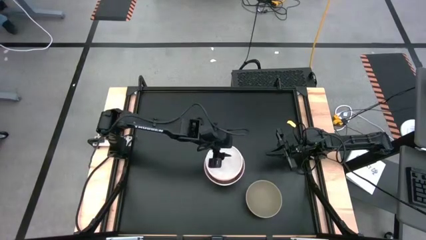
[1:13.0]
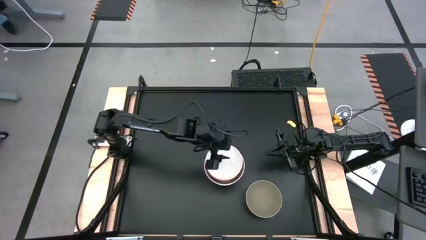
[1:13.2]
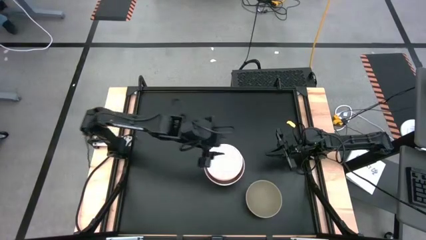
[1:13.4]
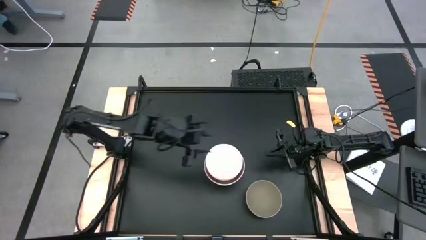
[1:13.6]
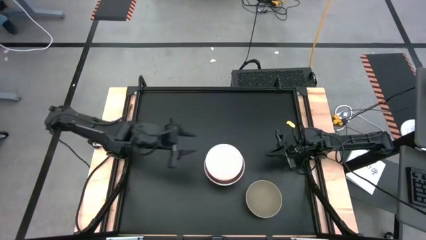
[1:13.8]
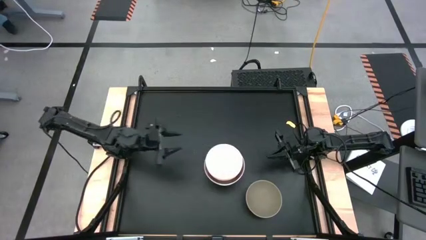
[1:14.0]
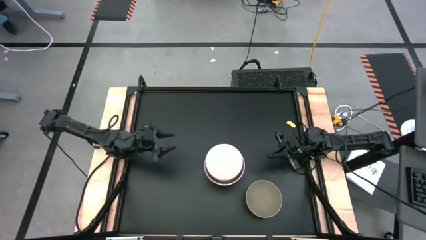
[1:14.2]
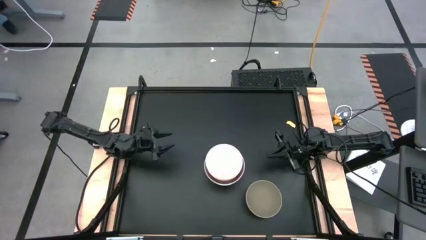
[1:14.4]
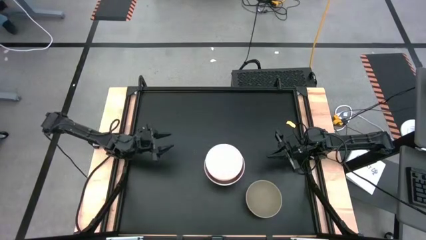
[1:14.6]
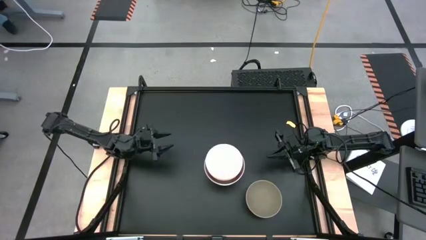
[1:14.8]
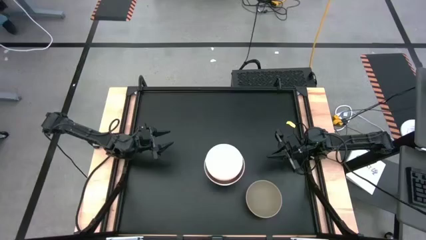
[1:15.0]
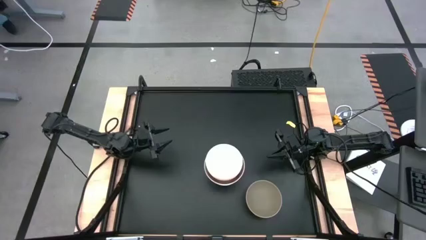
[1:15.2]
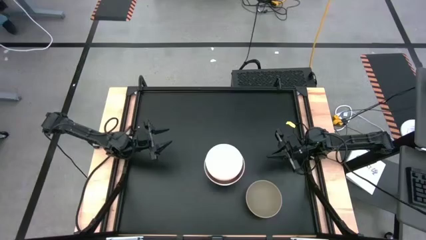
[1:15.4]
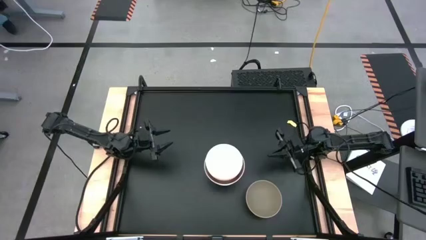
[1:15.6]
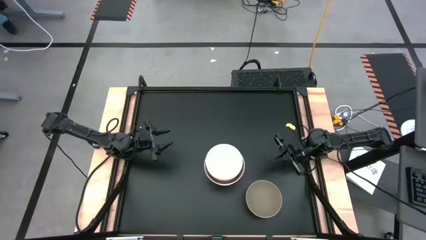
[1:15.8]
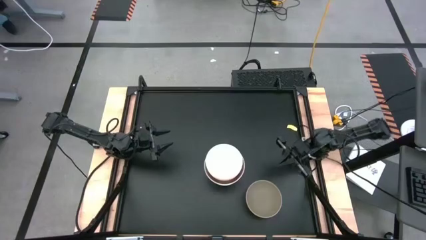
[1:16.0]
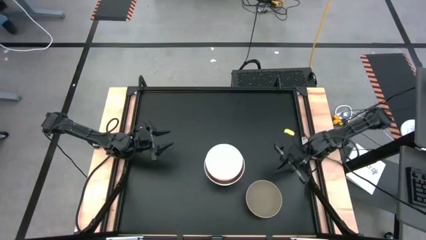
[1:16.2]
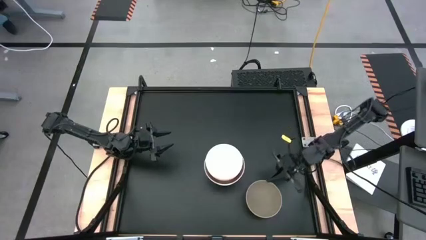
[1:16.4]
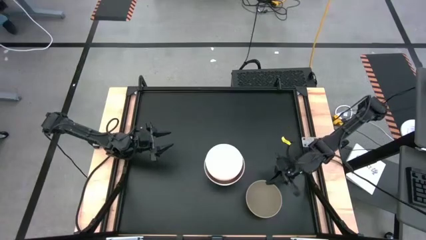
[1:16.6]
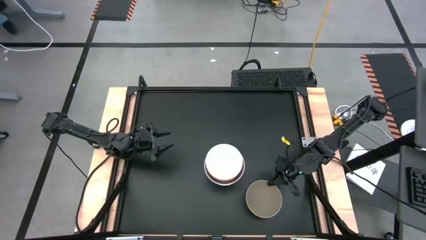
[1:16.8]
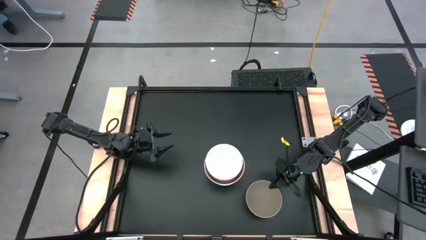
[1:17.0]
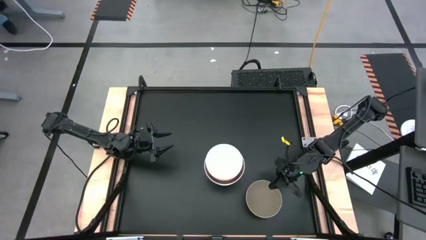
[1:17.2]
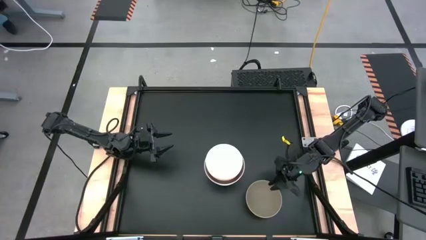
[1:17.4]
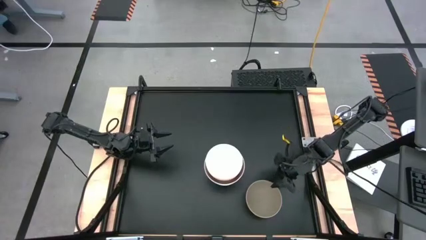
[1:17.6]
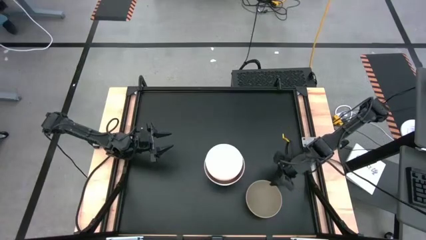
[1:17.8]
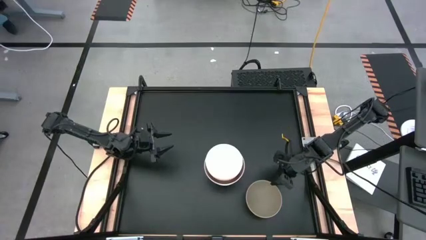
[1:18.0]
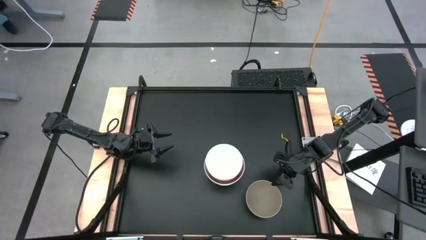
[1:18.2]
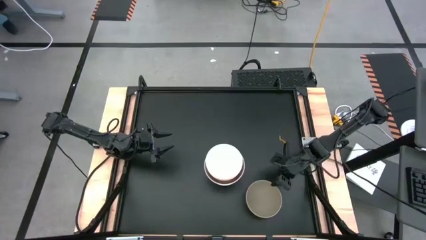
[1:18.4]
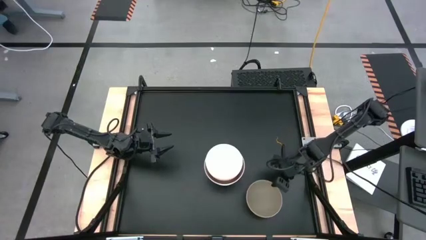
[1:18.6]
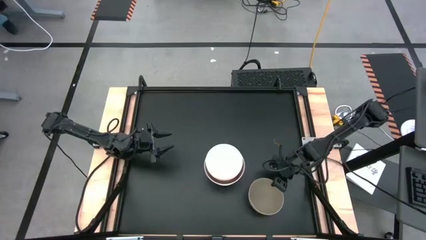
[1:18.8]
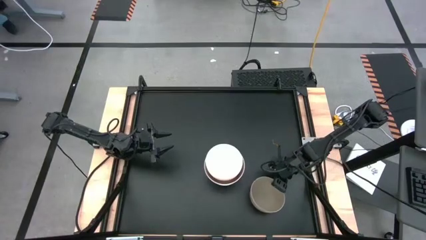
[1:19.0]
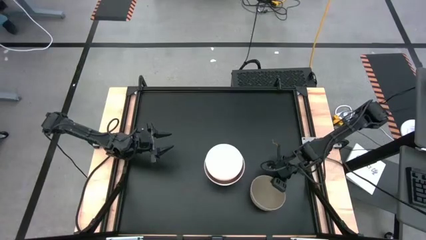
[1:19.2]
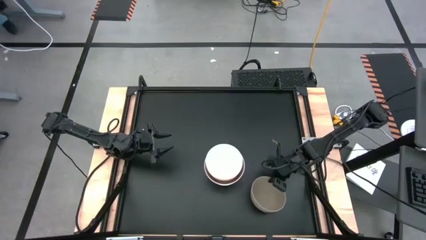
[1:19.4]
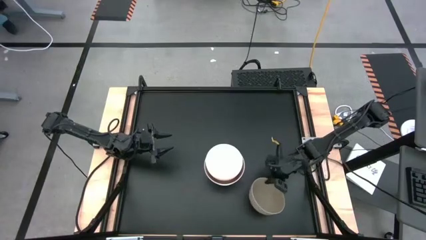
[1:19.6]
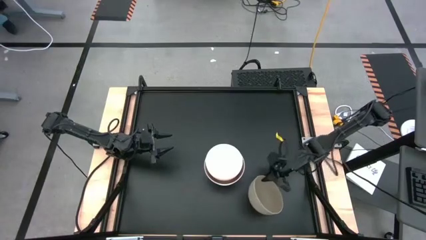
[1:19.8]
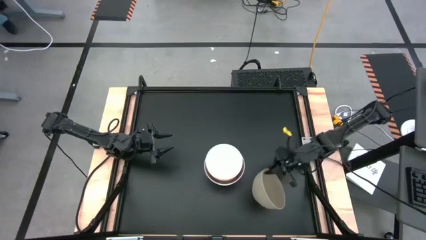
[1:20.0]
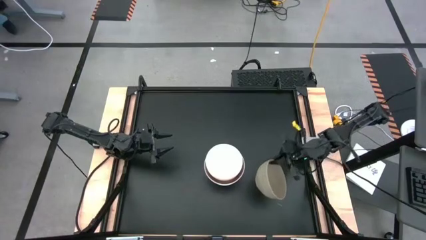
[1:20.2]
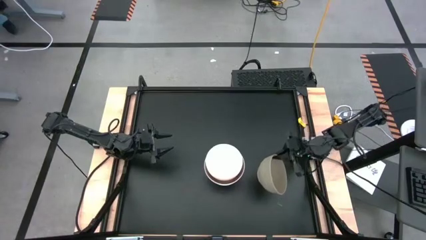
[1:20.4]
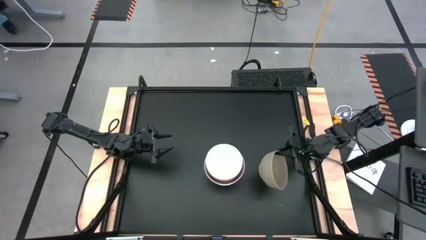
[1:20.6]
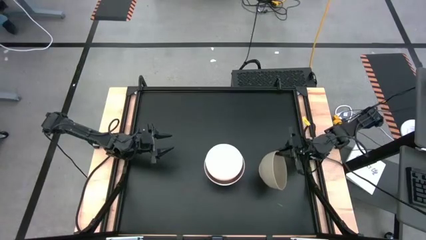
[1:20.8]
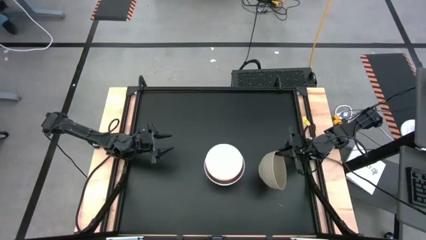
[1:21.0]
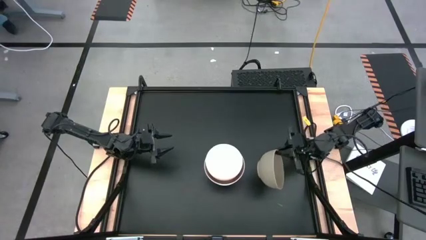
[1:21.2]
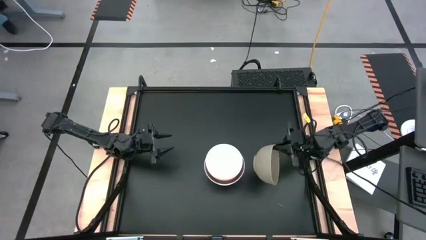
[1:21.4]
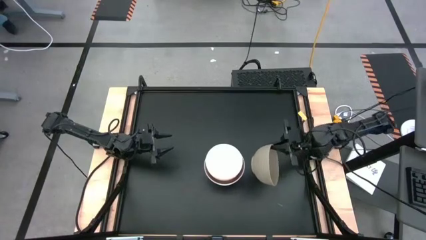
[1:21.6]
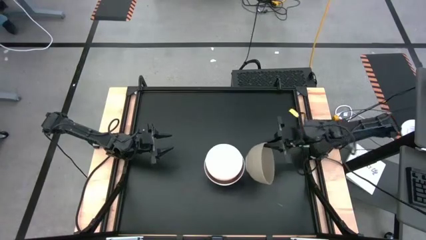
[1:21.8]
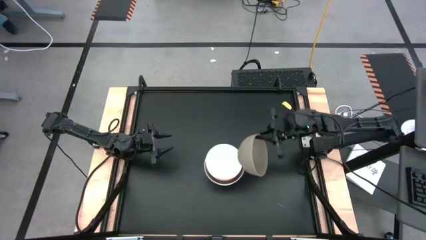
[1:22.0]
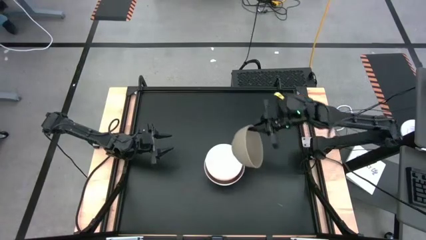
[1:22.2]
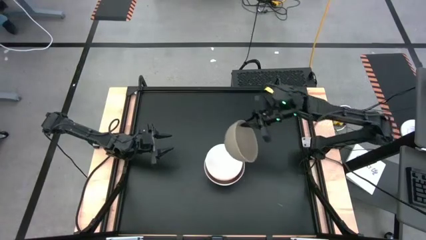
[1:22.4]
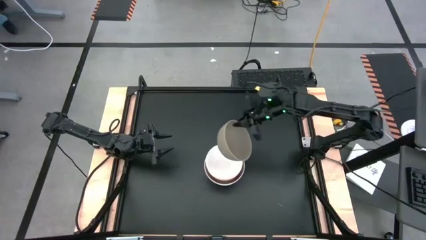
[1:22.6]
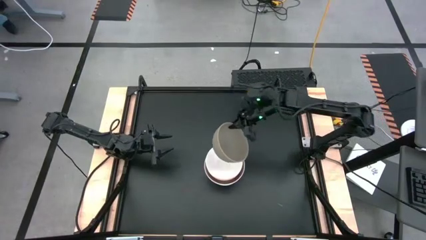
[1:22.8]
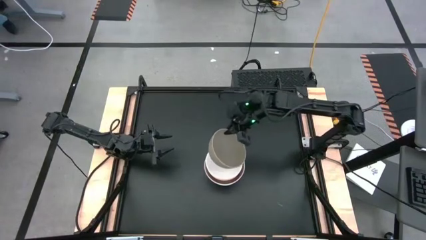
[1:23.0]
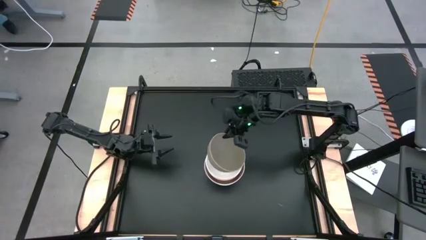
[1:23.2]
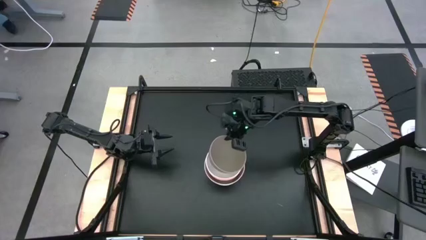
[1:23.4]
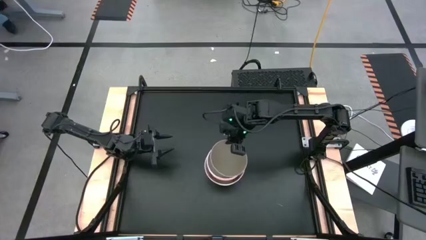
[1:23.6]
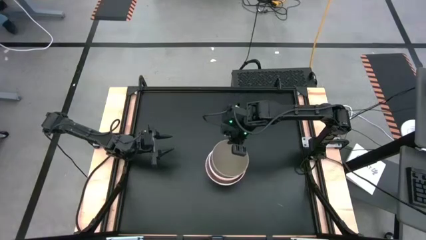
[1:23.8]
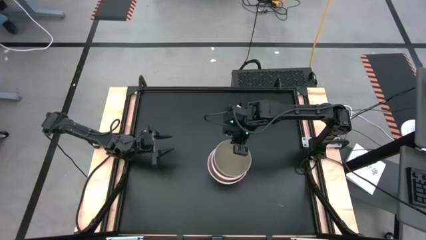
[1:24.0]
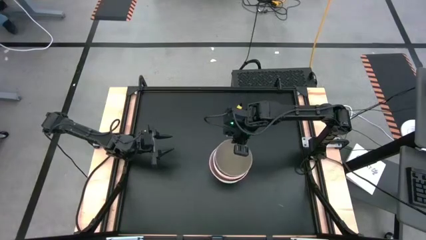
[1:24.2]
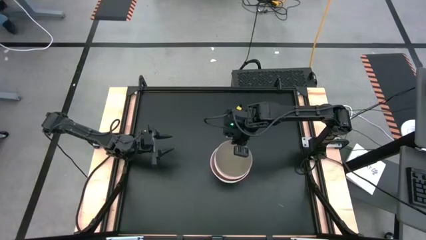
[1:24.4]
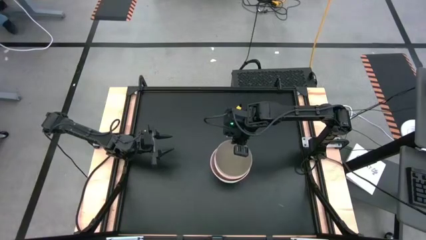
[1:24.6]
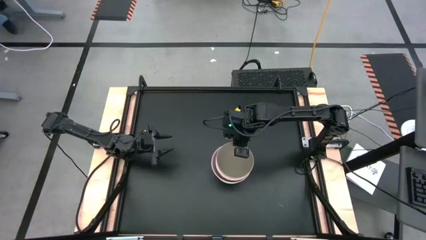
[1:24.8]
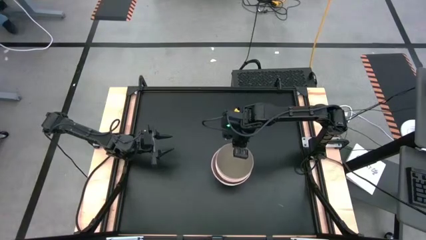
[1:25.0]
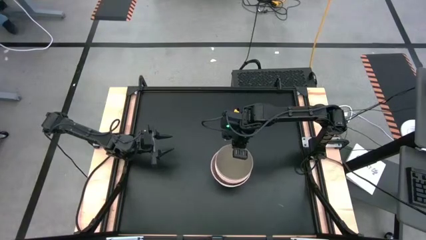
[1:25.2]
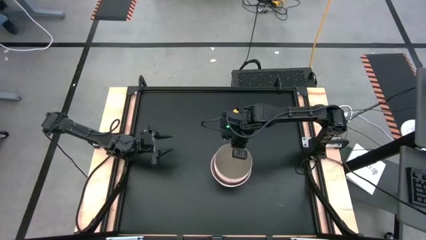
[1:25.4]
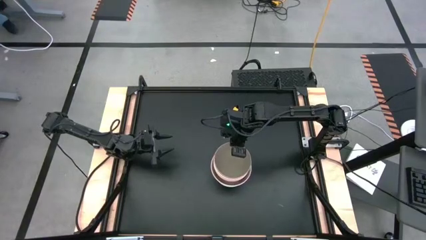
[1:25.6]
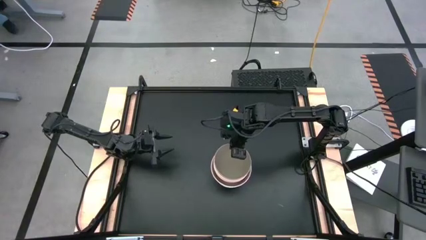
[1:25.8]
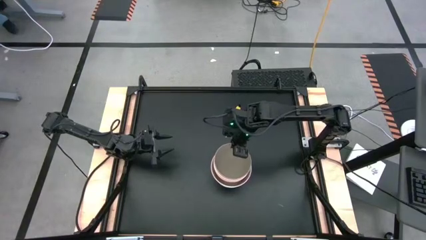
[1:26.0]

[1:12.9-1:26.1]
Task: Nest bowls inside each other
Stack the brown bowl on the white bowl

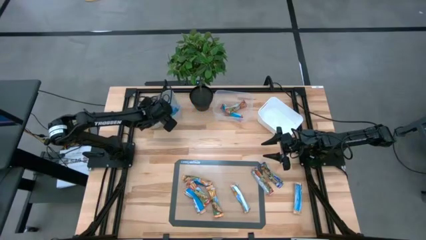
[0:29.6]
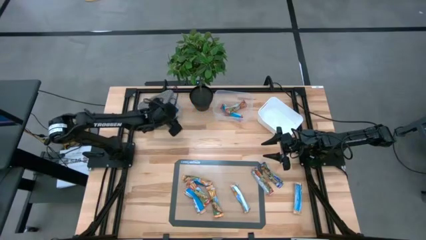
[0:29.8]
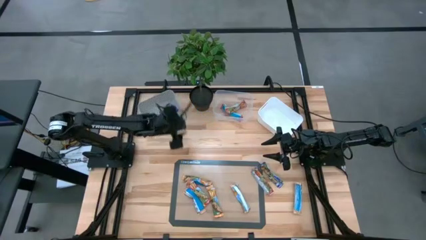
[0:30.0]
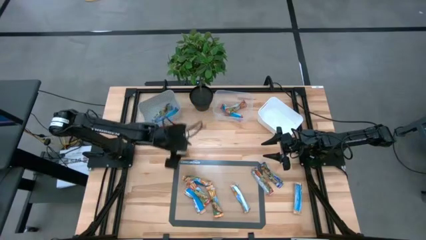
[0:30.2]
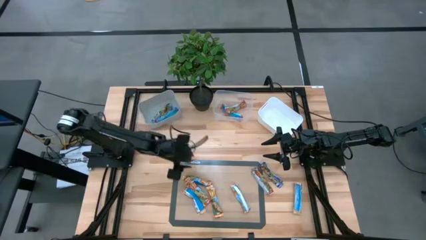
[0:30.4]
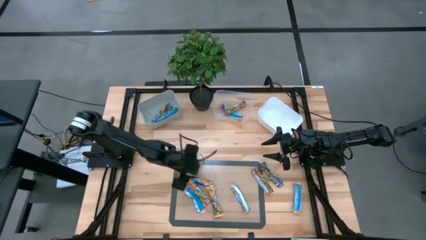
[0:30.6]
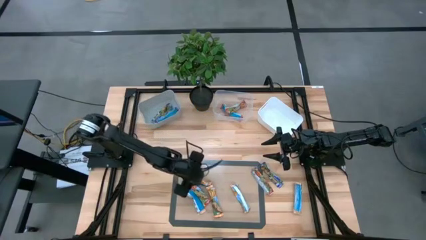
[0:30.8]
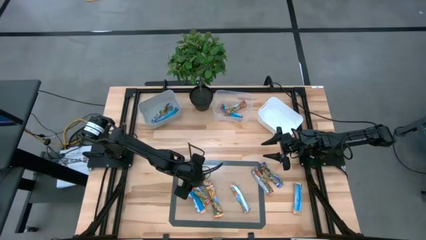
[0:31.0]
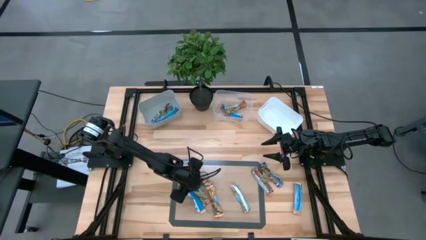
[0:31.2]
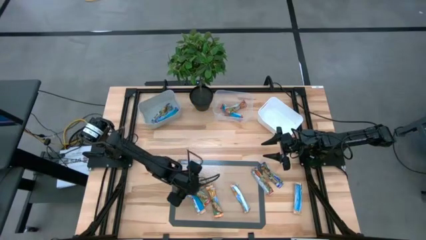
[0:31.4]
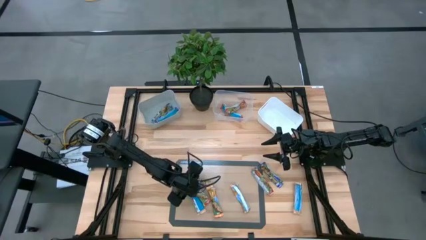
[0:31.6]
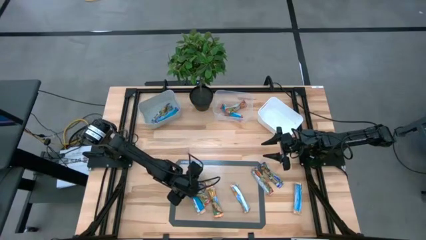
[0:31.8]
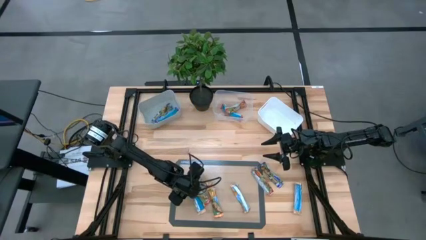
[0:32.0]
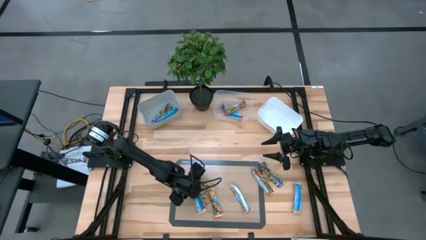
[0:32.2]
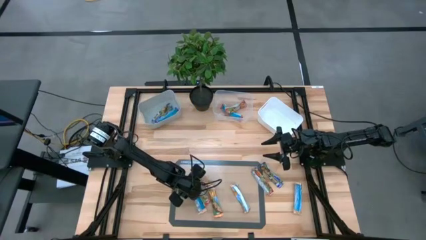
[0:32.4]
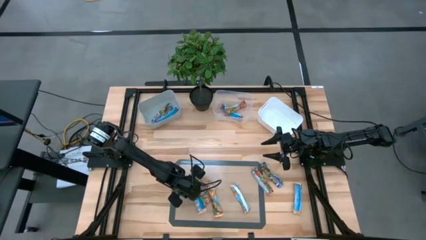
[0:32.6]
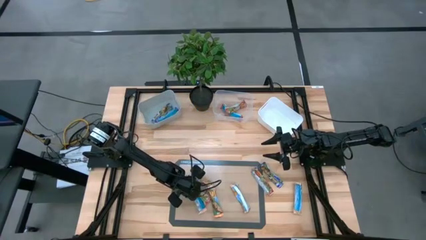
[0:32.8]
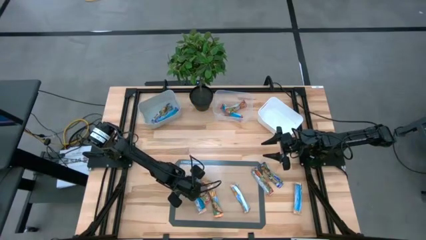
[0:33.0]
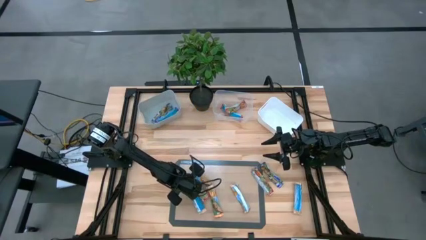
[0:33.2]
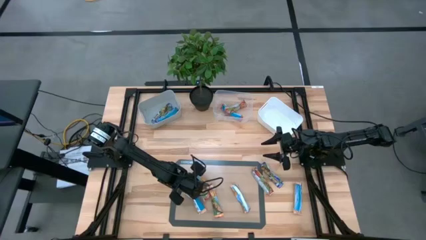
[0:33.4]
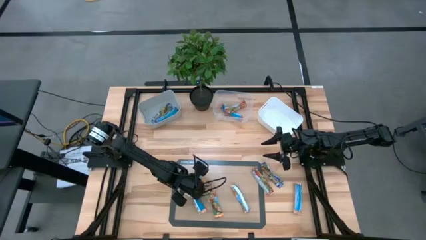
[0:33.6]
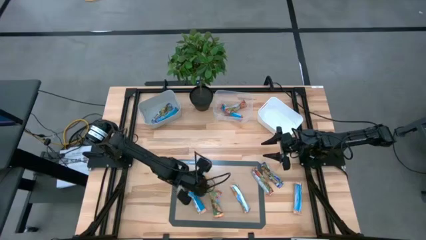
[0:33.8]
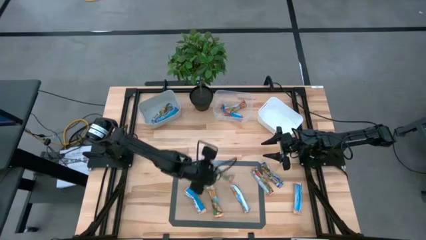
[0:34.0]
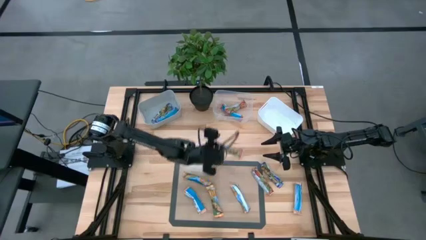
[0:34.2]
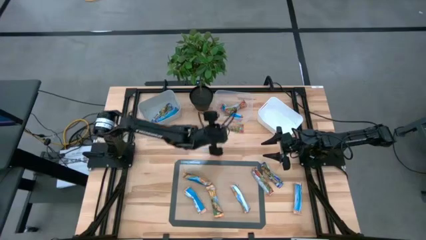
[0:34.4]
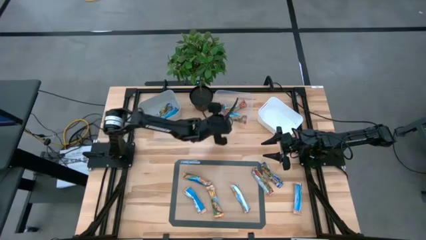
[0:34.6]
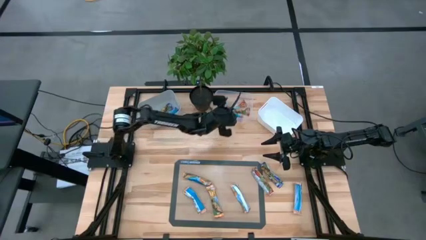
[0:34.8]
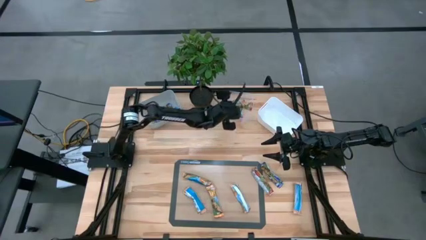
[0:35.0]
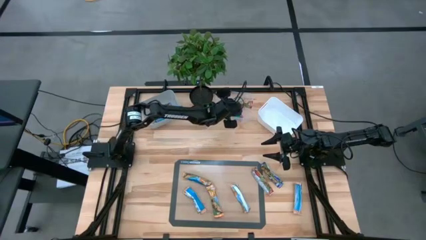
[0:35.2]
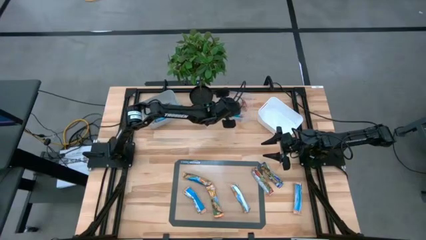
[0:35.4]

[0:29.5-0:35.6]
Task: Pick and place Granola Bars by type
Put the red granola bar into the transparent bin
